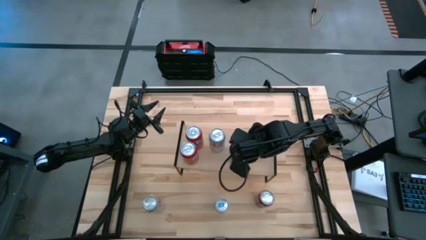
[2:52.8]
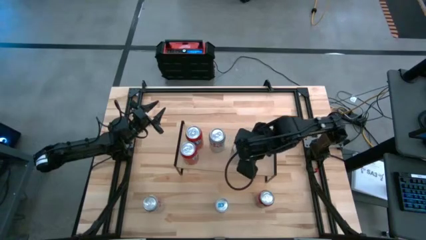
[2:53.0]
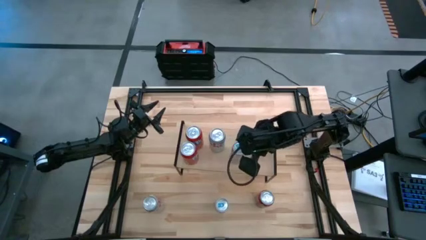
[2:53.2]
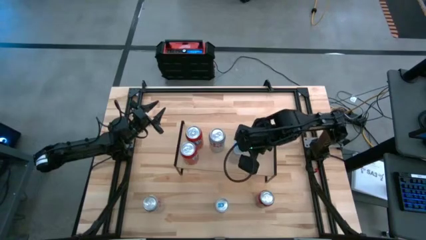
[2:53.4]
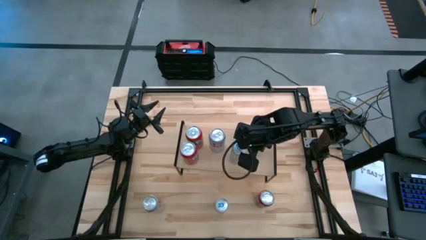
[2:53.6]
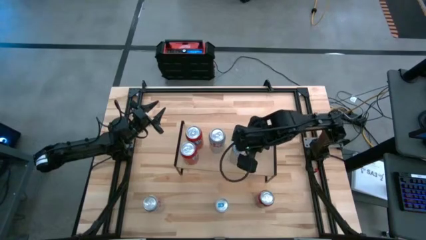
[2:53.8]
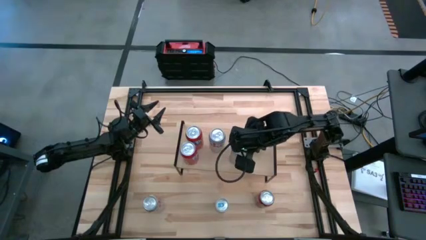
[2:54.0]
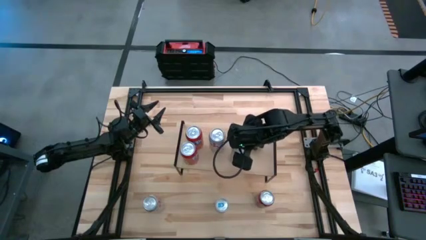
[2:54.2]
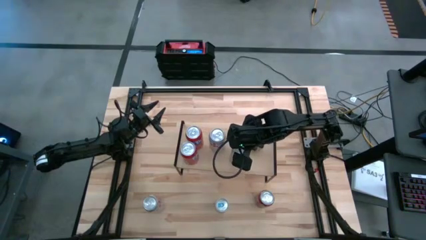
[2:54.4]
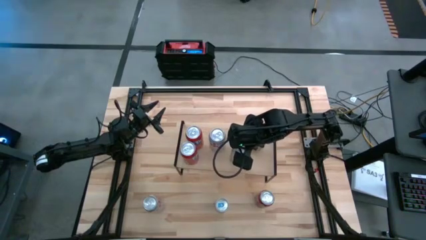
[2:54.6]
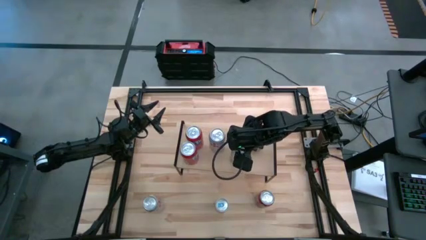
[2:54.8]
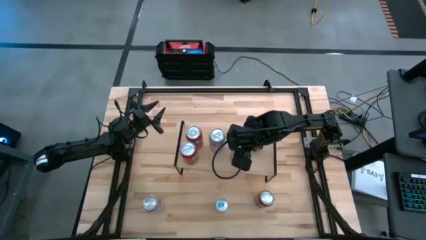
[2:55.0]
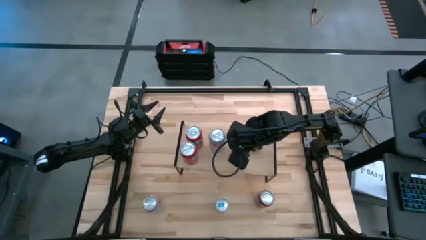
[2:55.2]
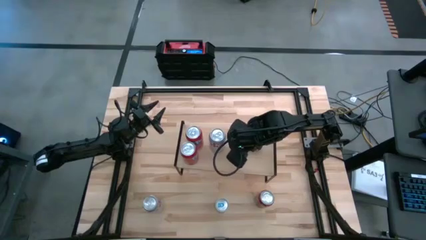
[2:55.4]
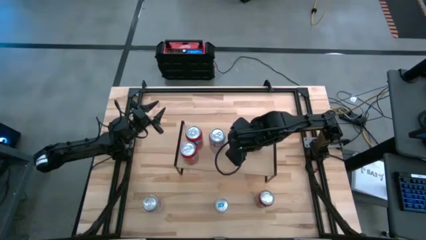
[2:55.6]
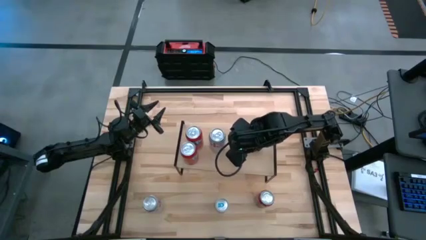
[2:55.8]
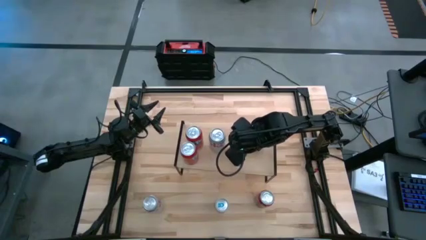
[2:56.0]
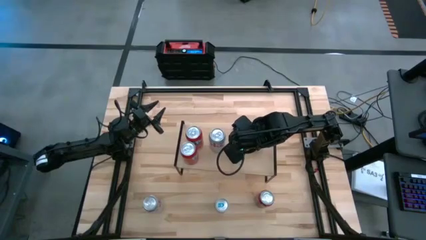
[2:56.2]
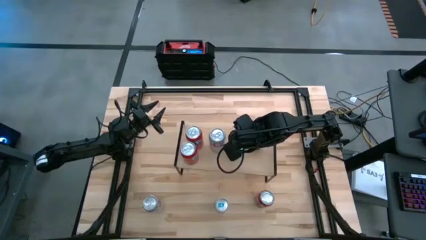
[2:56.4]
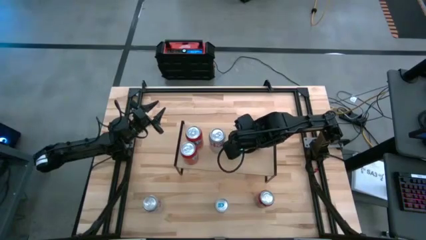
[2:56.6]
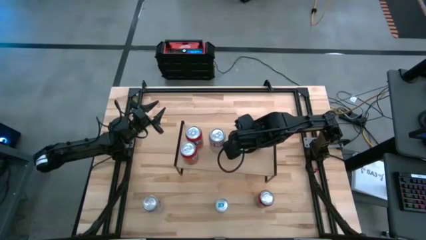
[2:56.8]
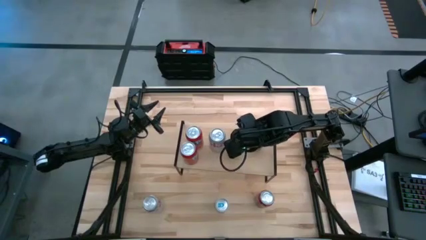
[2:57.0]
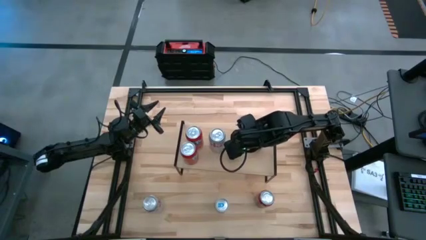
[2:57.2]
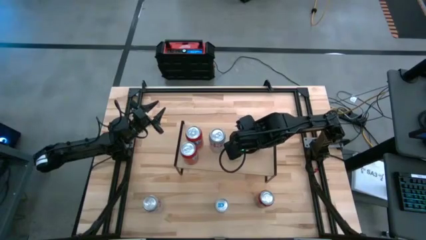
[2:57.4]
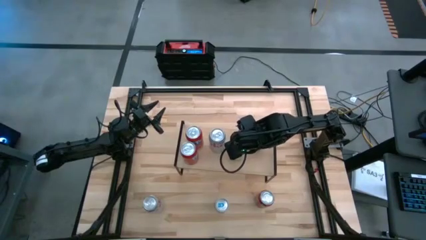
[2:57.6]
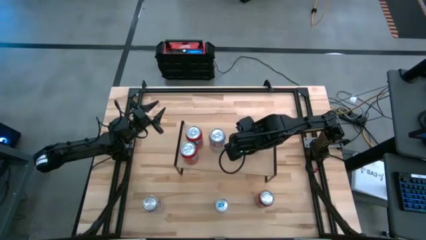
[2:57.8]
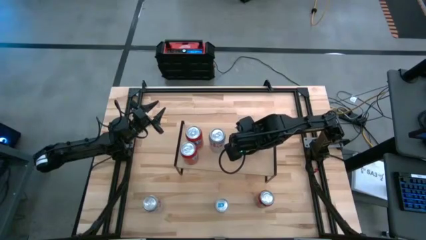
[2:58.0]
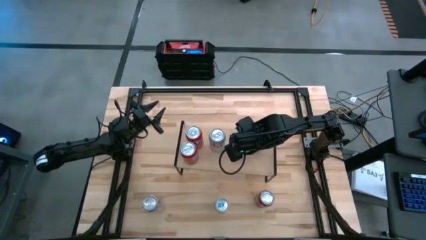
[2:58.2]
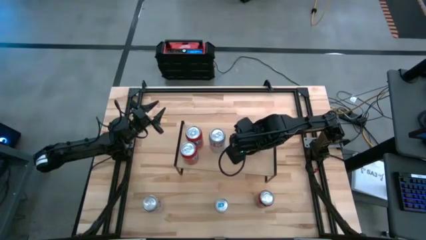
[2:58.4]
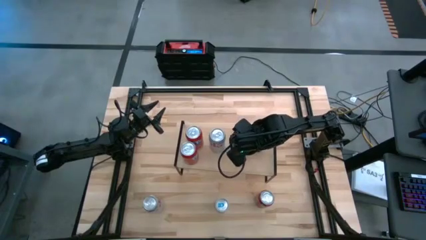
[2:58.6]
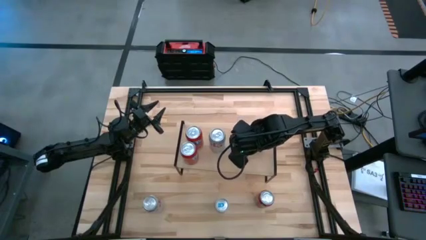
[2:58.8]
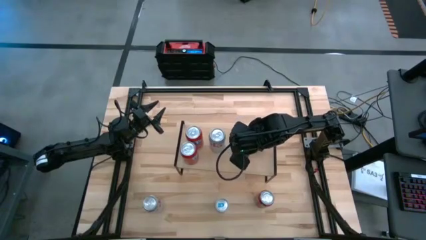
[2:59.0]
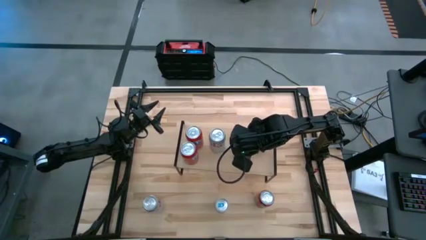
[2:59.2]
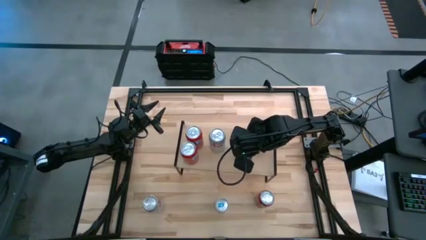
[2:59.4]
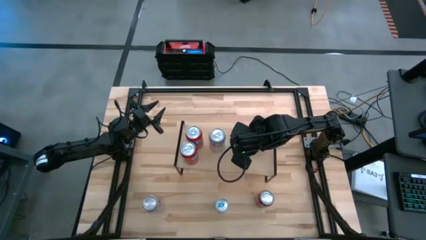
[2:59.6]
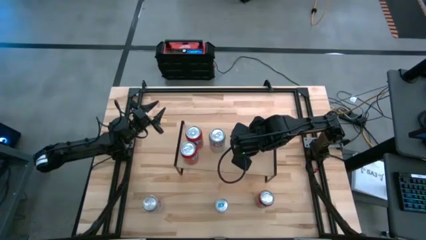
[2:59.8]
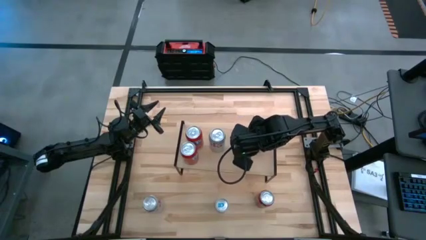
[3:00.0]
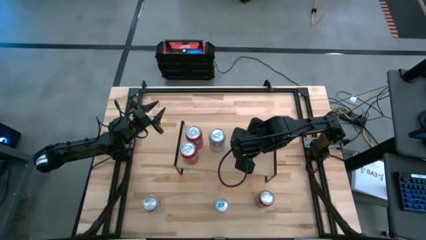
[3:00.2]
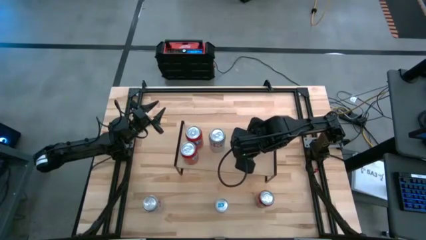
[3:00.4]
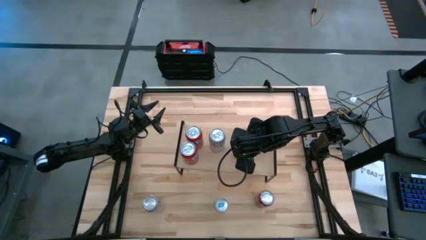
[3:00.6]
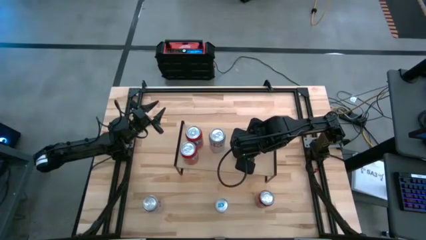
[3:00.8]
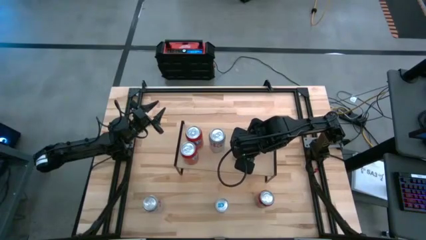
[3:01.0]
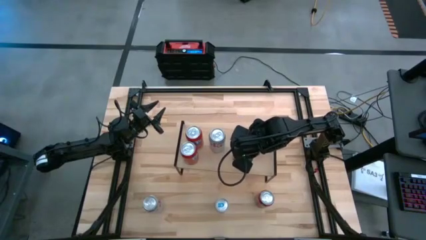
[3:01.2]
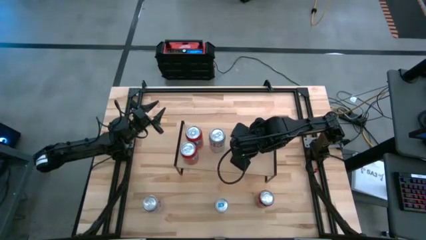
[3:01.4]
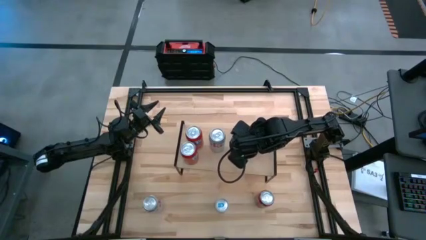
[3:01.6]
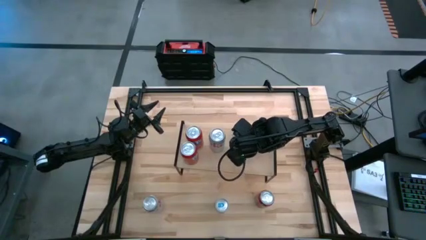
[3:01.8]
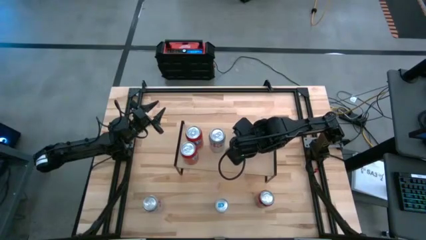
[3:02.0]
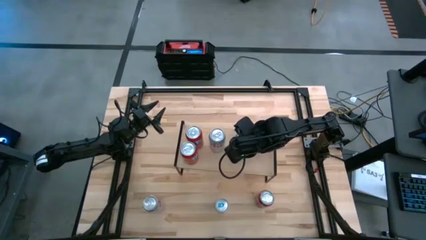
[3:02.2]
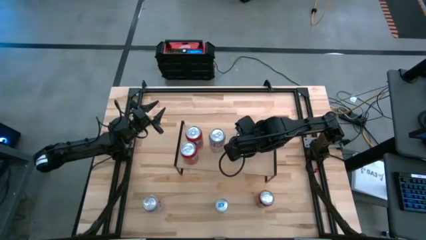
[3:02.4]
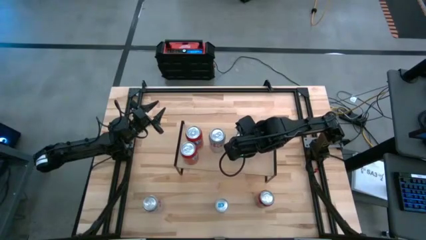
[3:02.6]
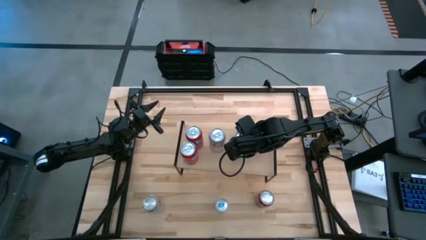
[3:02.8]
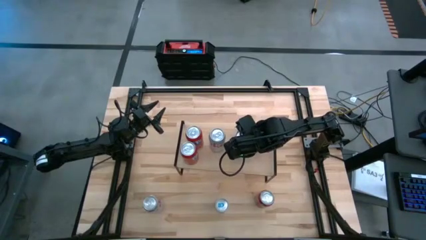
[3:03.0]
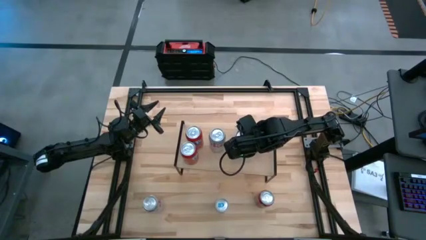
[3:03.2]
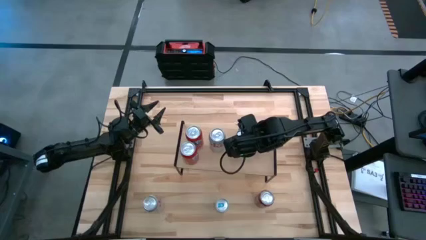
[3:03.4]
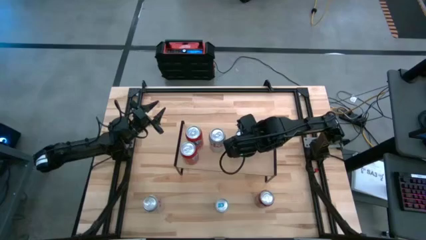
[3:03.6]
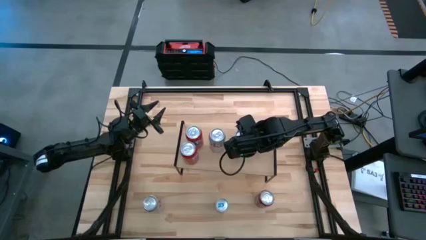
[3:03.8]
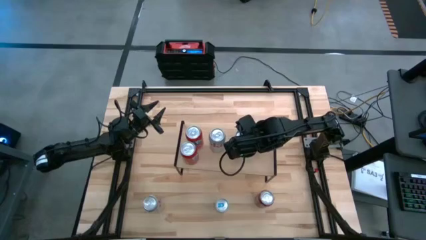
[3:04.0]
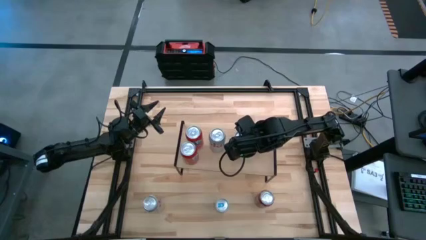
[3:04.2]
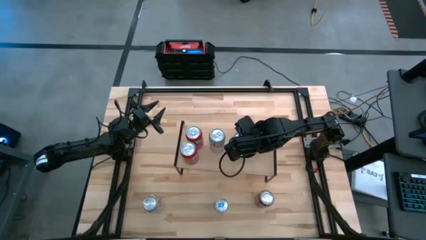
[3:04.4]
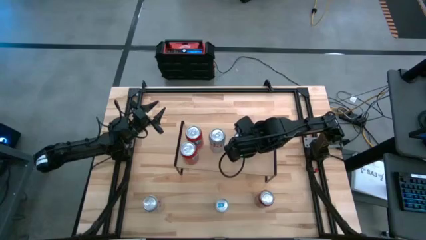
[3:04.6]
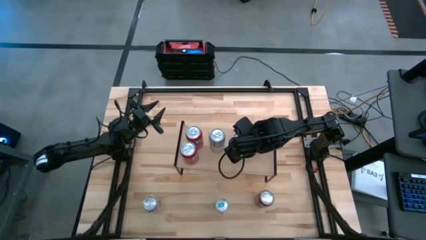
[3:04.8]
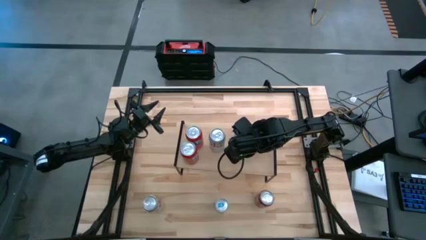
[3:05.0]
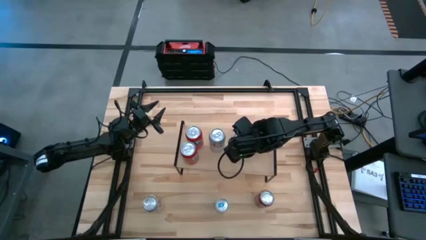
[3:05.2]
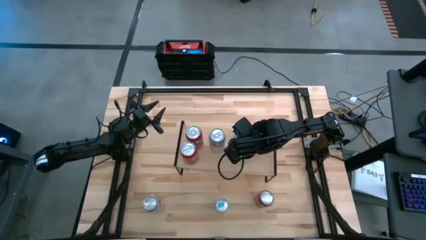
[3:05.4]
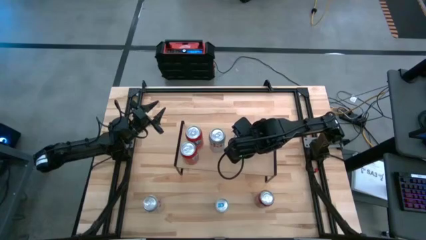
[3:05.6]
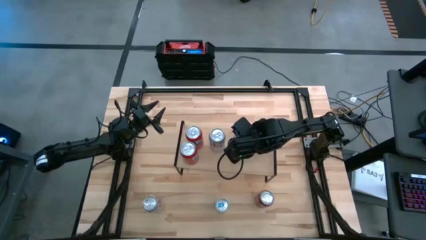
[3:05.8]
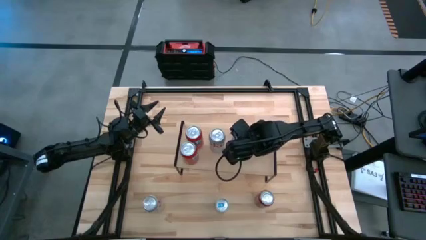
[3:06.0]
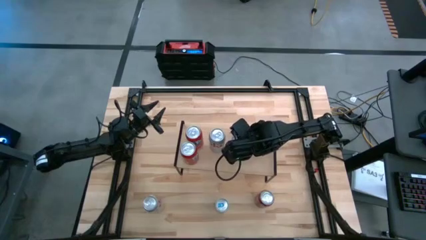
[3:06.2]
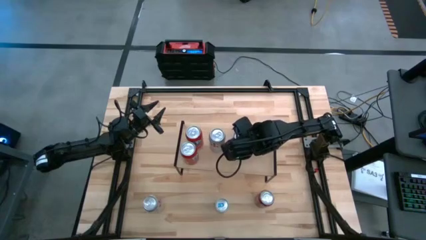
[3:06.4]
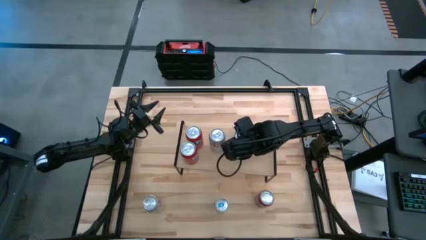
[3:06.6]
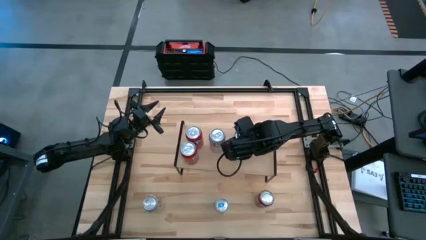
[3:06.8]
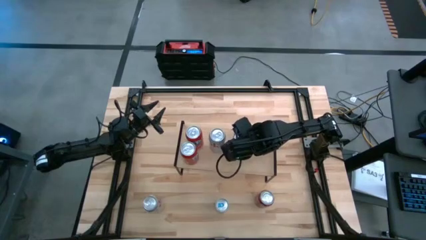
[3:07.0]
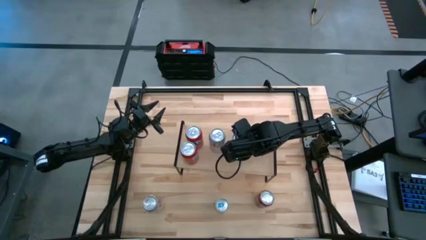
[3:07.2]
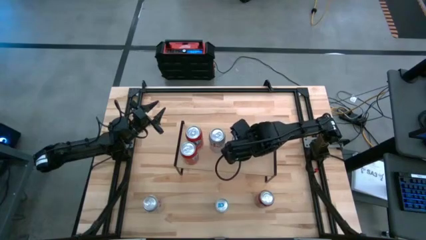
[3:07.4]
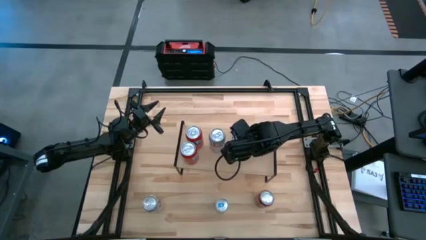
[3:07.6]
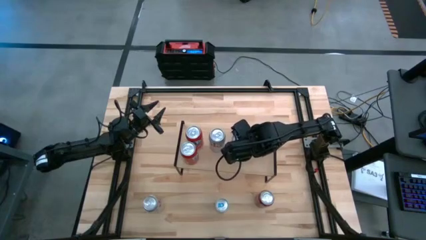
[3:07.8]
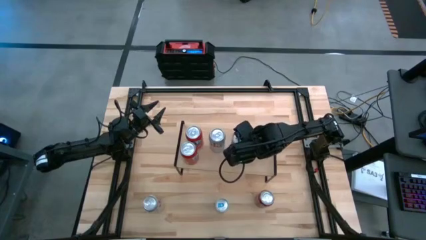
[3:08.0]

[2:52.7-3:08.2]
Task: Place canned beverage on shelf
Put the right blue soda can on the shelf

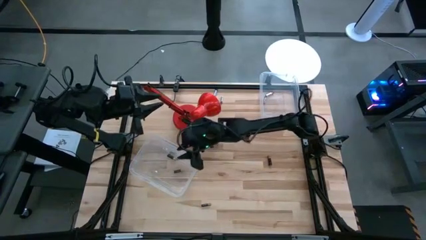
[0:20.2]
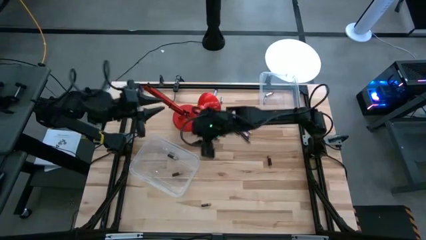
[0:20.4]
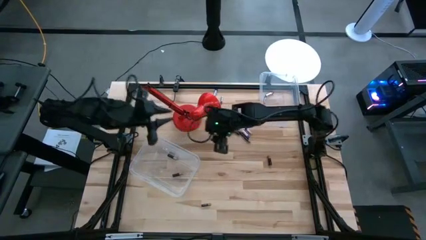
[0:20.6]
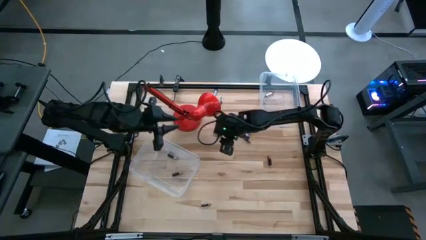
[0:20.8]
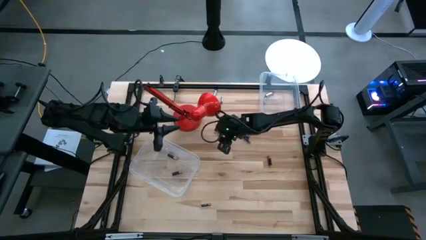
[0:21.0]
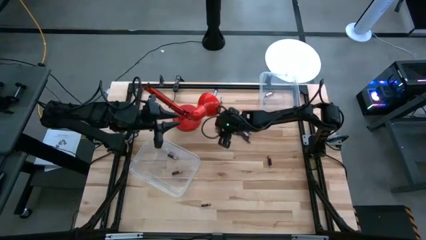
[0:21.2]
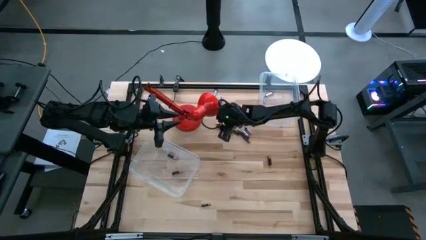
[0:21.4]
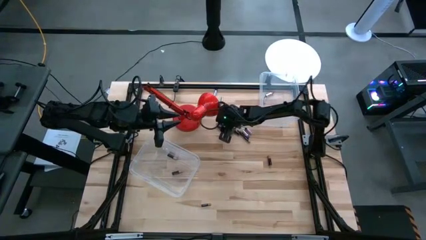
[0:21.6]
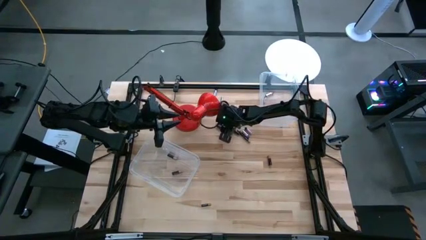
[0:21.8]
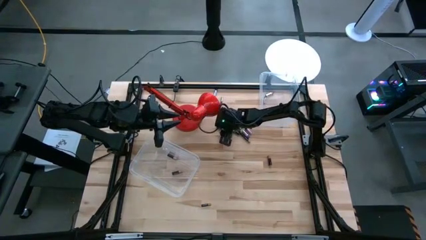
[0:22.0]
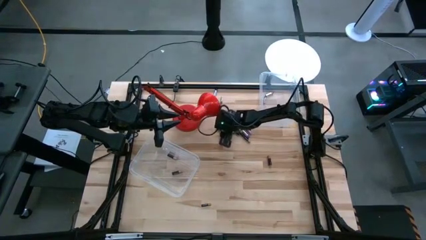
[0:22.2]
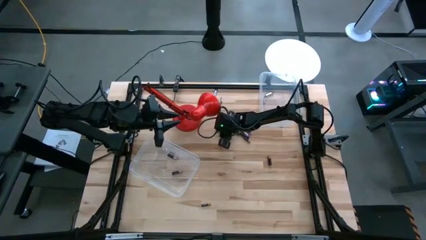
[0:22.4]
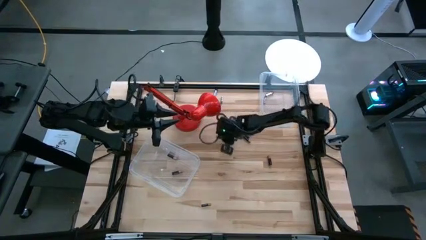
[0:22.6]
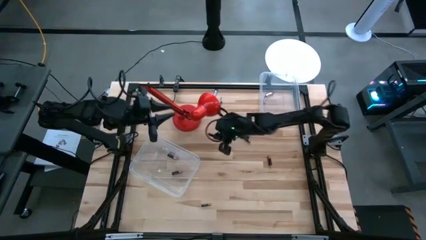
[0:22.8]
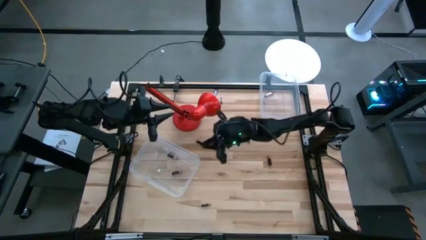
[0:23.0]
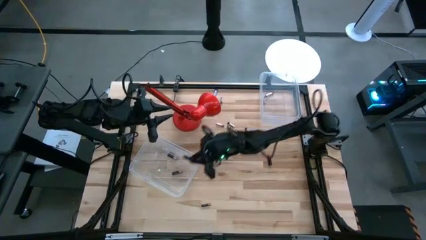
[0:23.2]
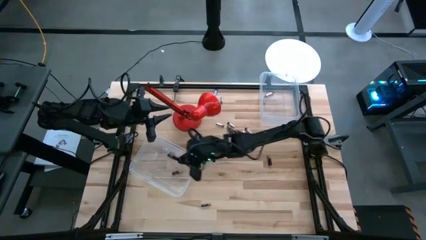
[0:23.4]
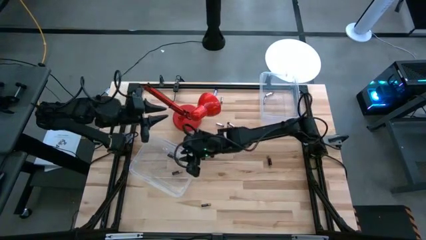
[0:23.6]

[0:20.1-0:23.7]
Task: Sort batteries
Put the black battery into the bottom transparent bin
